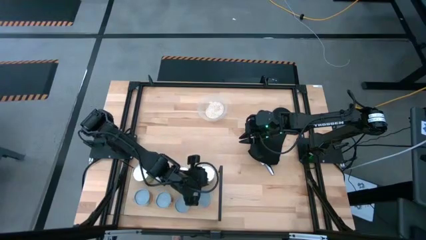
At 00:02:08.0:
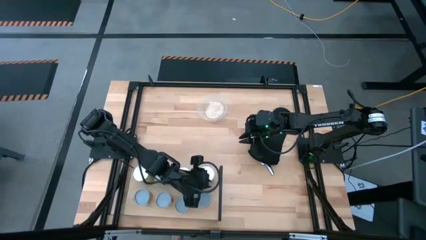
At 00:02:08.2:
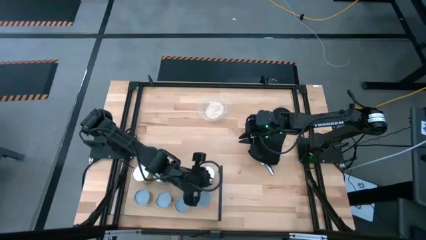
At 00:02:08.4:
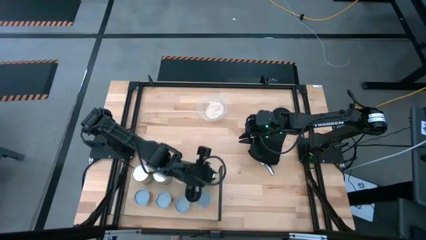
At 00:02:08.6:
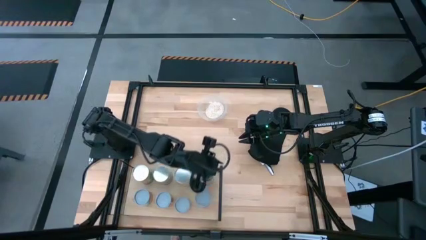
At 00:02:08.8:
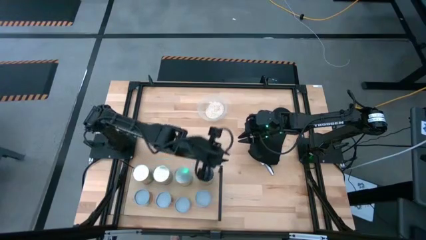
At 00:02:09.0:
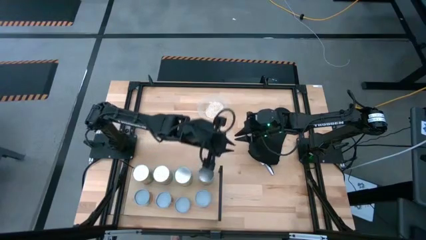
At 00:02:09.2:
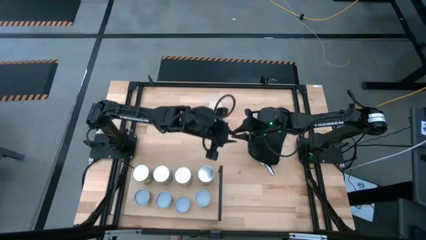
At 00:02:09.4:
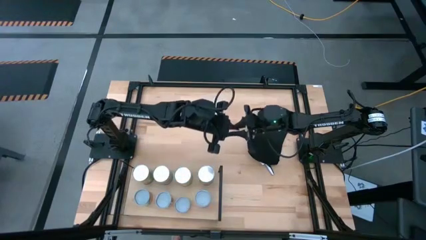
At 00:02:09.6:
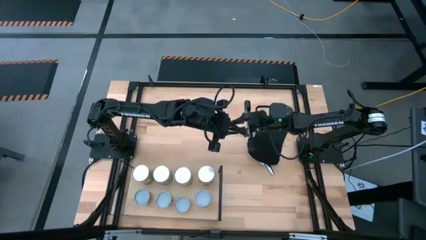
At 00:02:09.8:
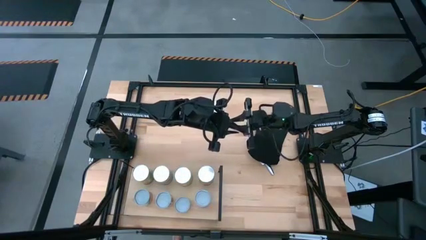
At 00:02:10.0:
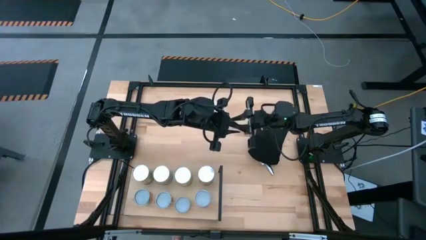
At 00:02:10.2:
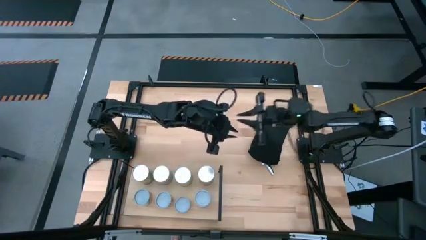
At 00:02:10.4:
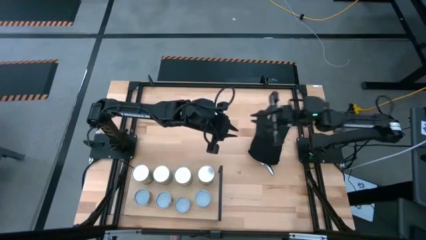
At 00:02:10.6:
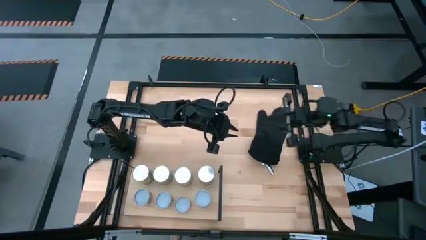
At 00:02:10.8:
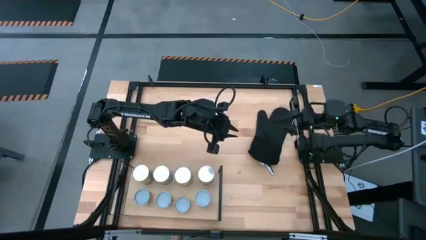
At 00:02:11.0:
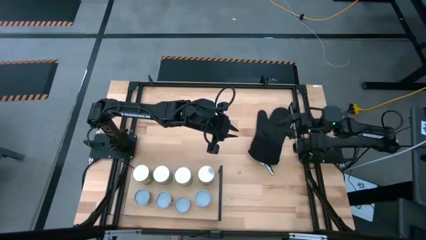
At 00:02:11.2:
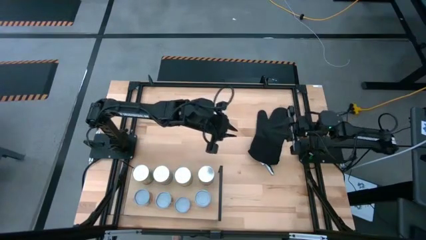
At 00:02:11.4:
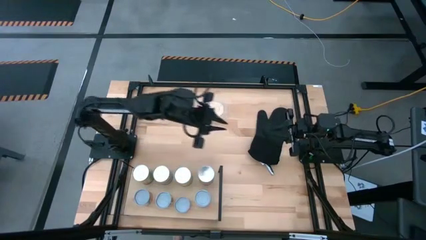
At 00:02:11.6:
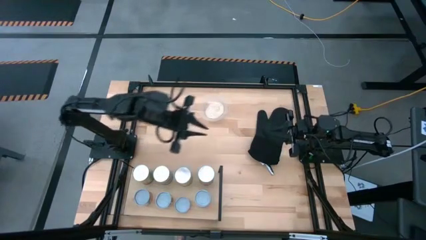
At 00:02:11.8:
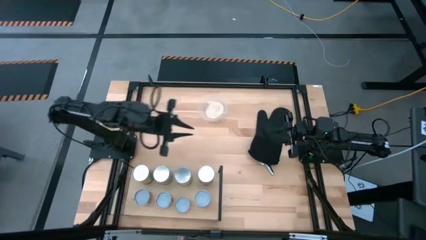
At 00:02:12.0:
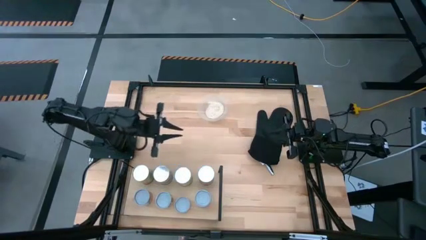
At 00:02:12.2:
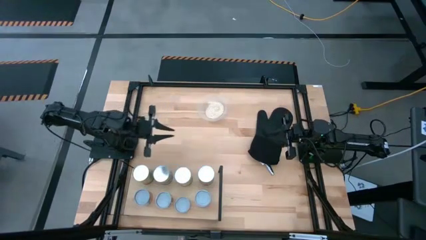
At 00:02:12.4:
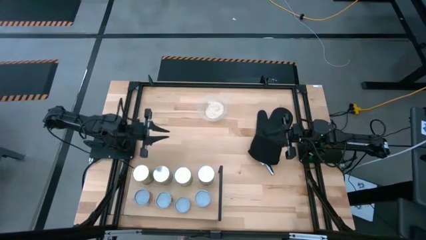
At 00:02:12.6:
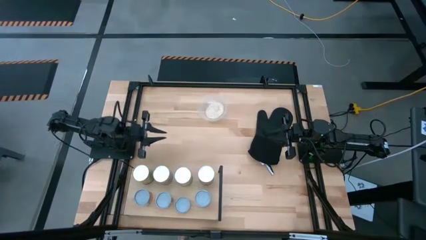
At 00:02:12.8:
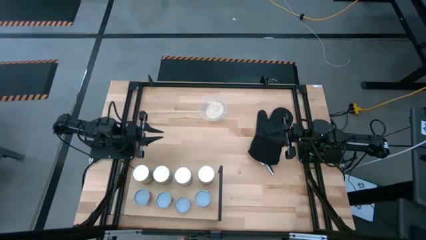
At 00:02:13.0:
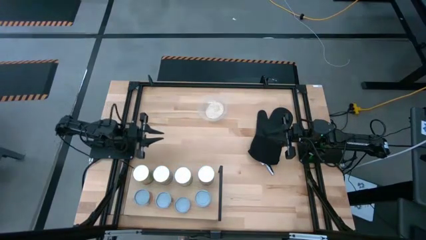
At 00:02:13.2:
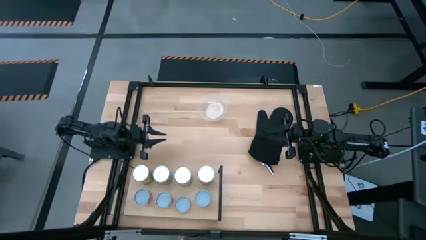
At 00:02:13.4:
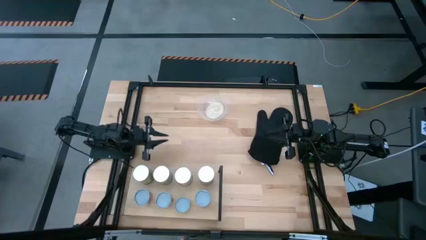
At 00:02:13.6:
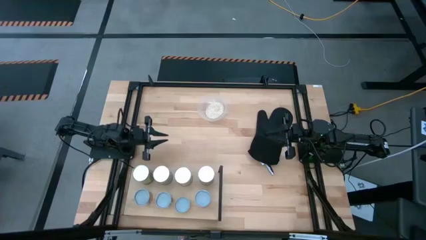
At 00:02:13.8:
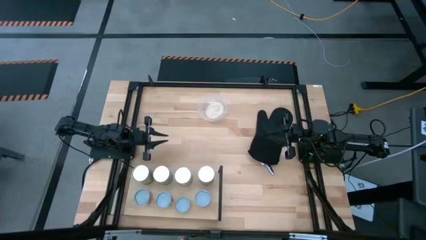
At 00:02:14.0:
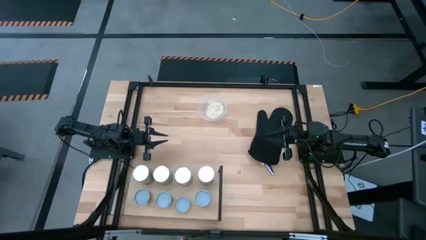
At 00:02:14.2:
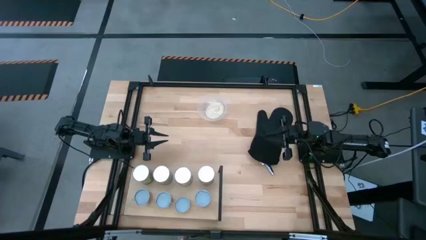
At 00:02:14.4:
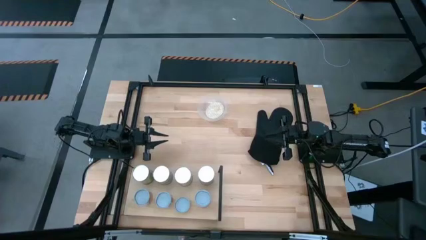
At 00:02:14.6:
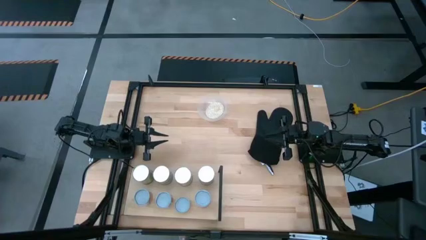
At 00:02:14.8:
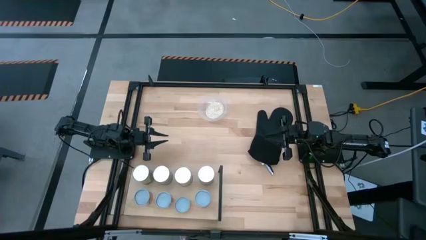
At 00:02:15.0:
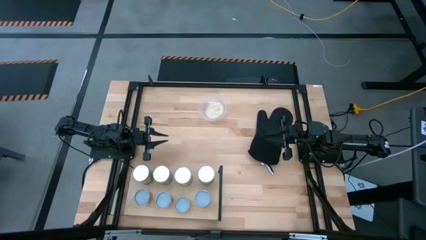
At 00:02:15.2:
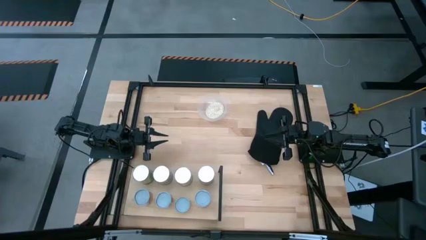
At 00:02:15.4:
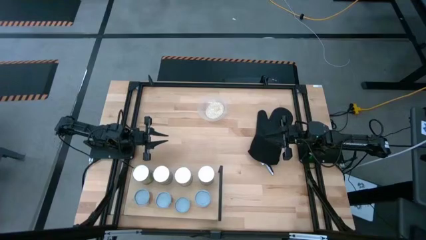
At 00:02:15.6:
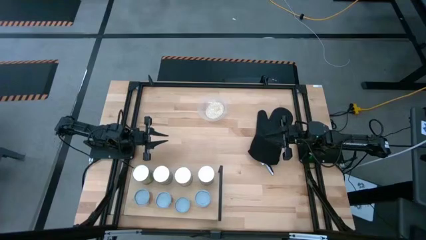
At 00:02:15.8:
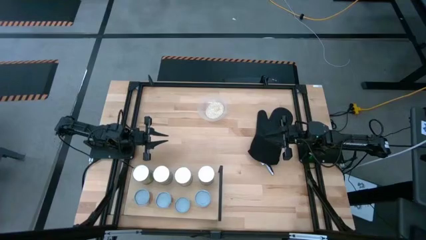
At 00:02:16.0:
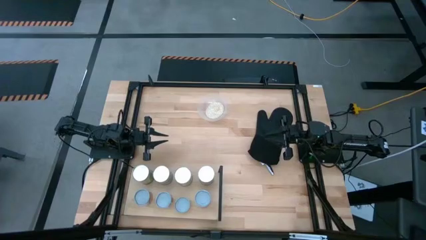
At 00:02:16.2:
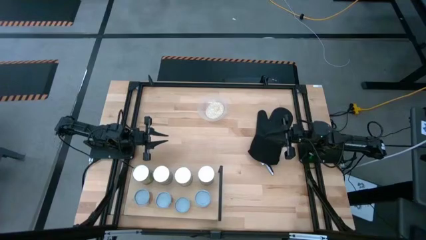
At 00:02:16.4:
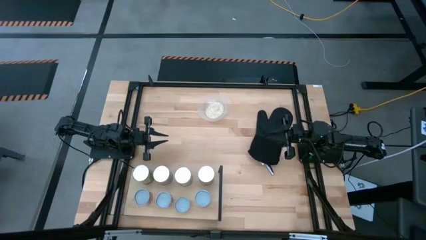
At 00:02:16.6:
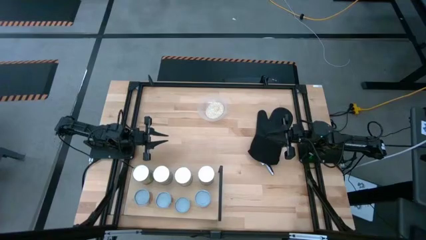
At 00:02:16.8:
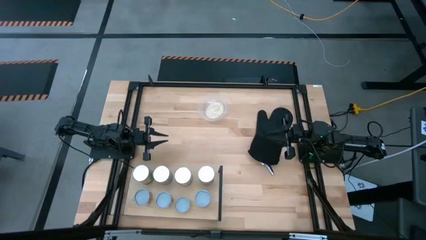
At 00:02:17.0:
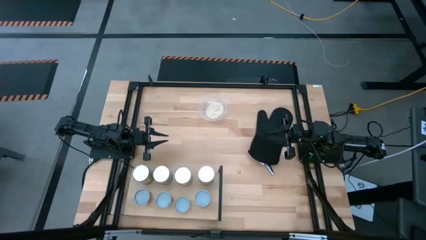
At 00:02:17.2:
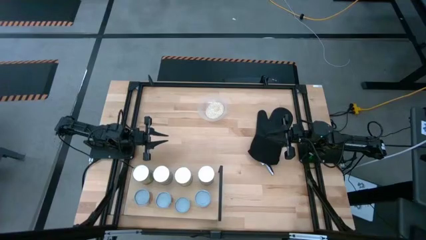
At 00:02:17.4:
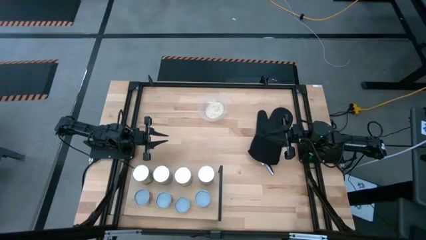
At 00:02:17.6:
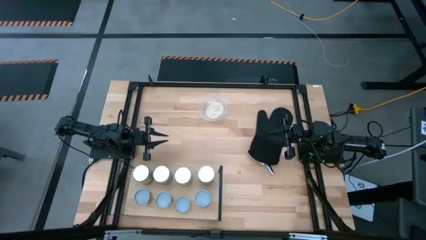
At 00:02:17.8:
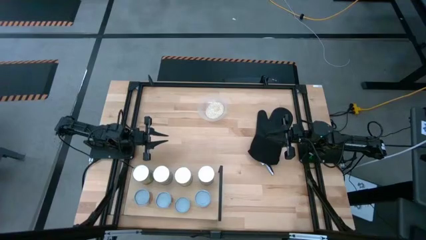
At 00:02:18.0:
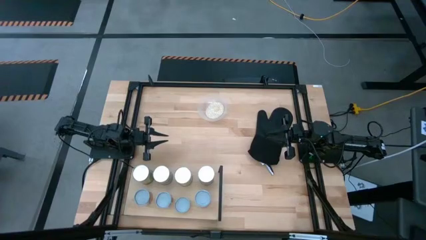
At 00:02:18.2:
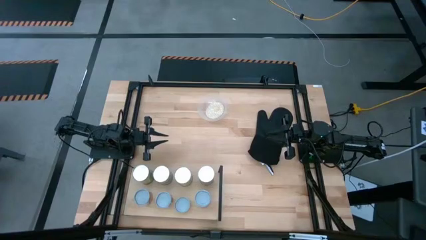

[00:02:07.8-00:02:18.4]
Task: Pick and place cans onto a shelf
Return to Home Position
